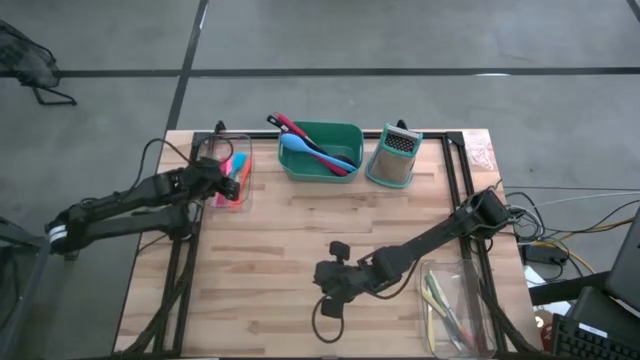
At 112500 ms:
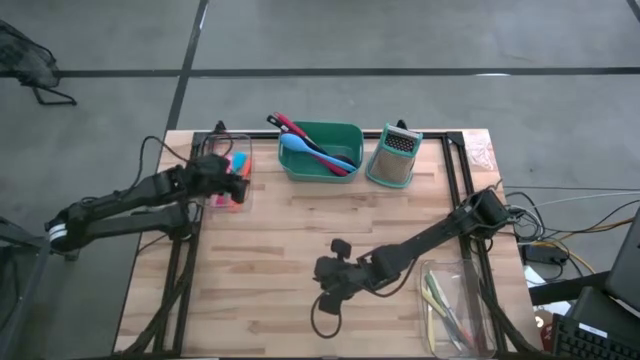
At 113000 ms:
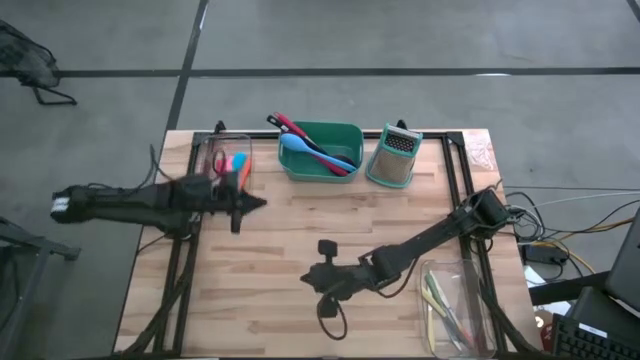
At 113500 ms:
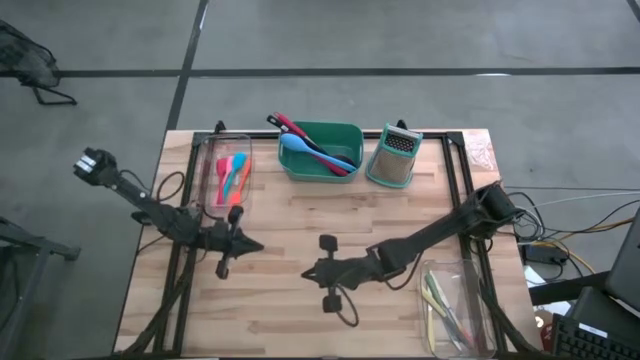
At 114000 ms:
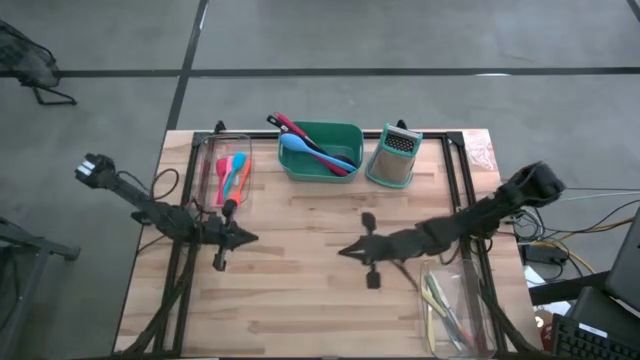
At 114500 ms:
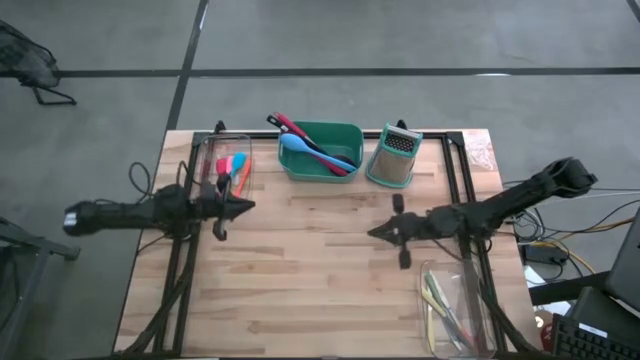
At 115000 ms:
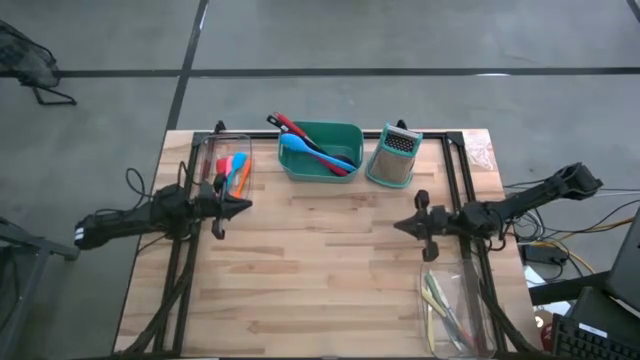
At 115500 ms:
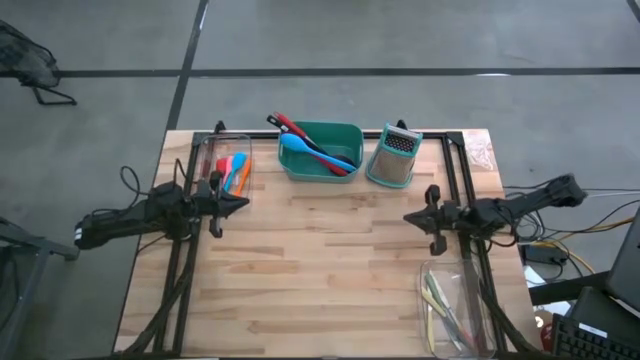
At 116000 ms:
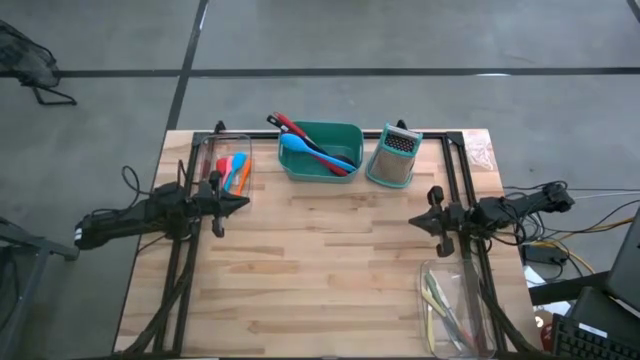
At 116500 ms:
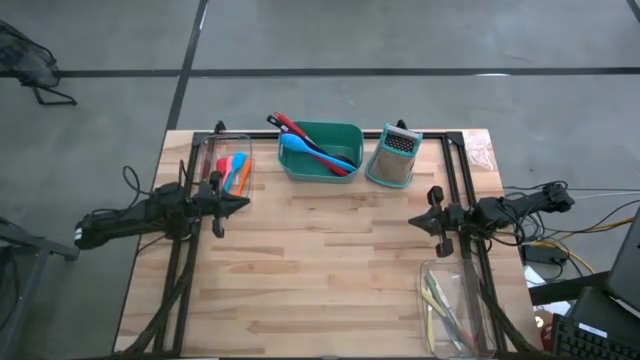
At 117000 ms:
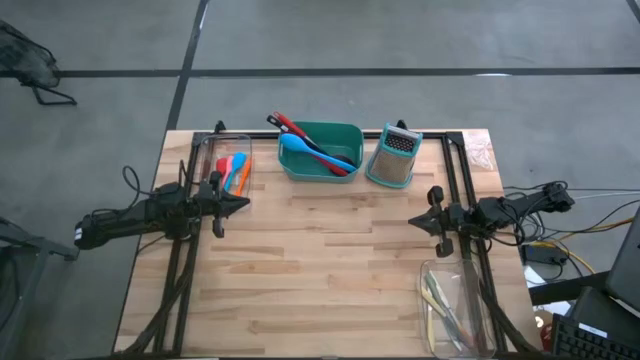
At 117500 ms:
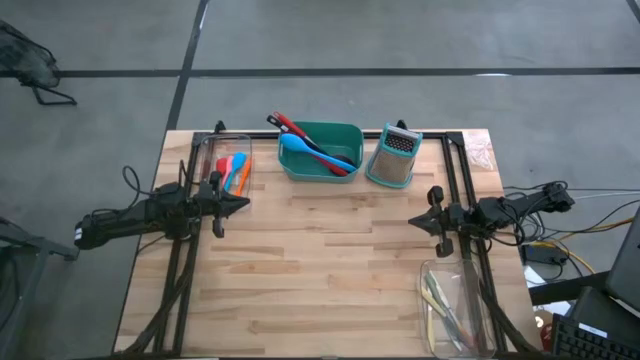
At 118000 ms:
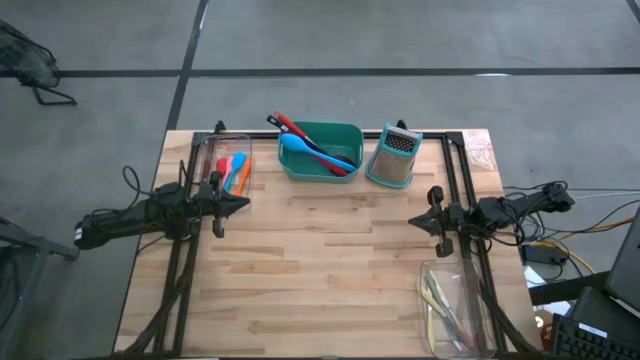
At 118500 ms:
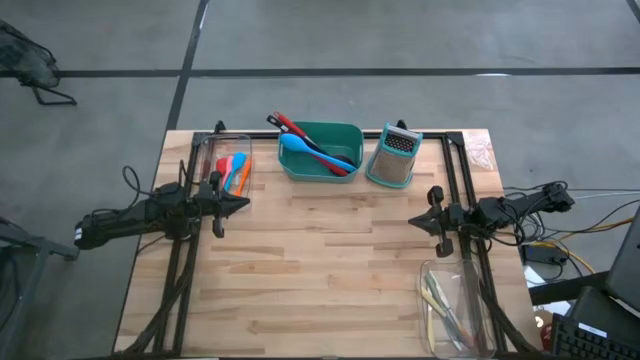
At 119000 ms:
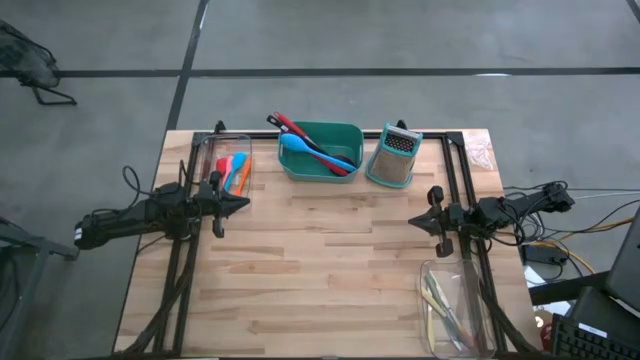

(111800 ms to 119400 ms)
Task: Pick & Place Kitchen Items
Return to home position

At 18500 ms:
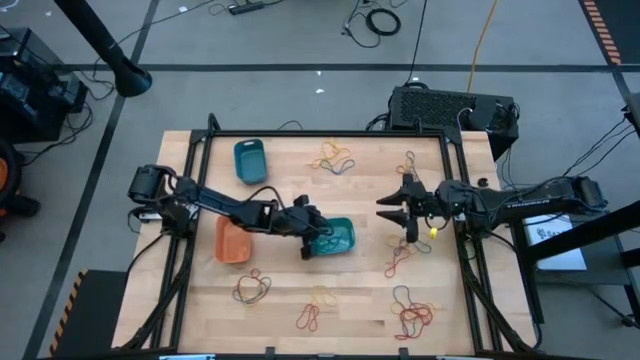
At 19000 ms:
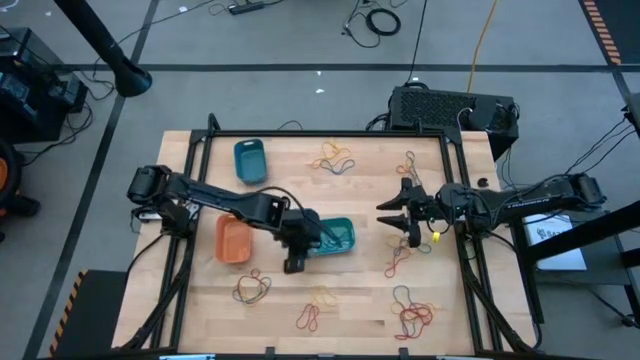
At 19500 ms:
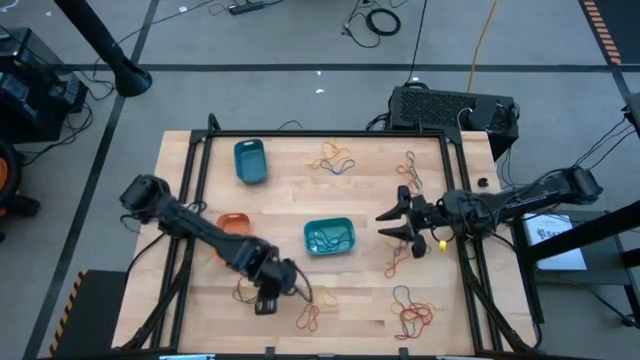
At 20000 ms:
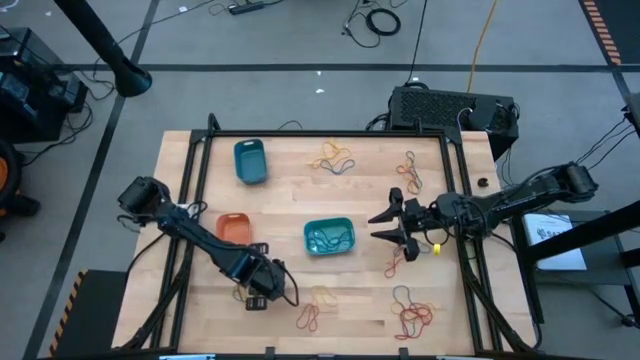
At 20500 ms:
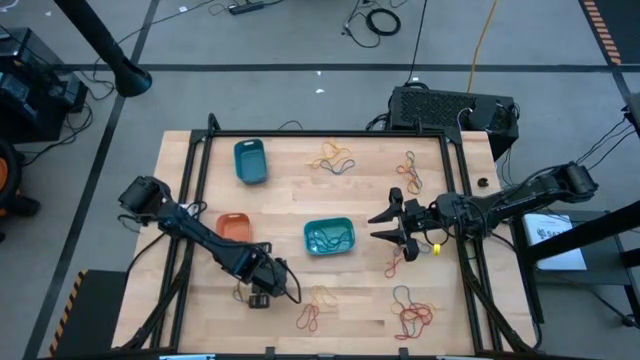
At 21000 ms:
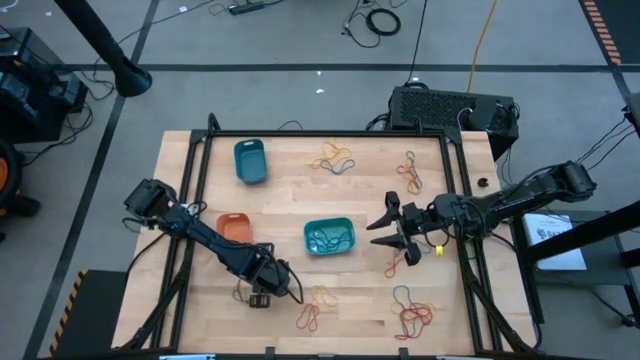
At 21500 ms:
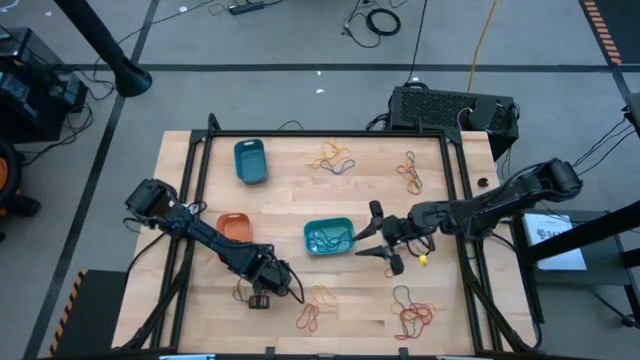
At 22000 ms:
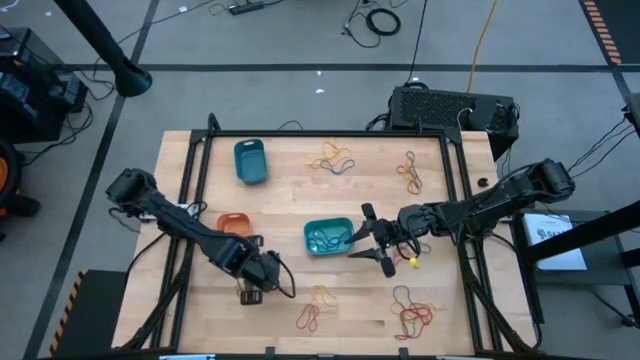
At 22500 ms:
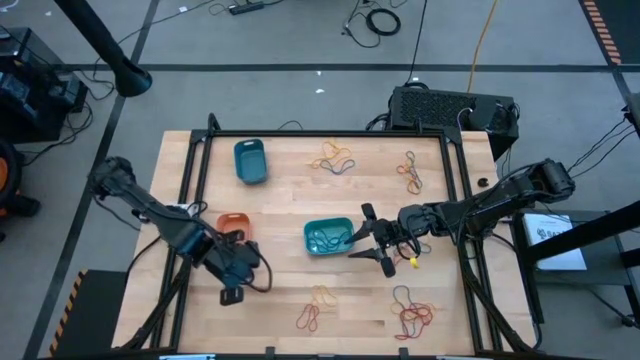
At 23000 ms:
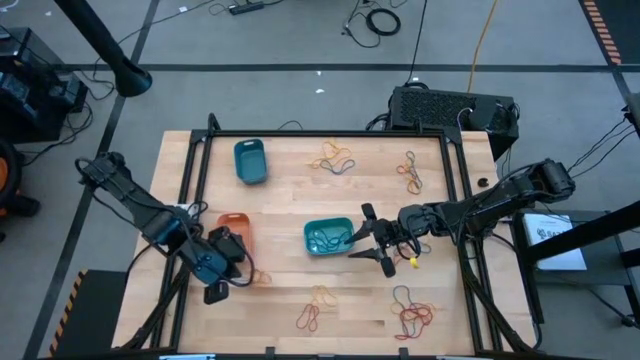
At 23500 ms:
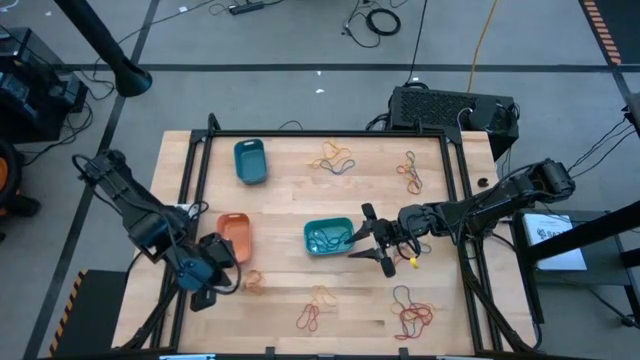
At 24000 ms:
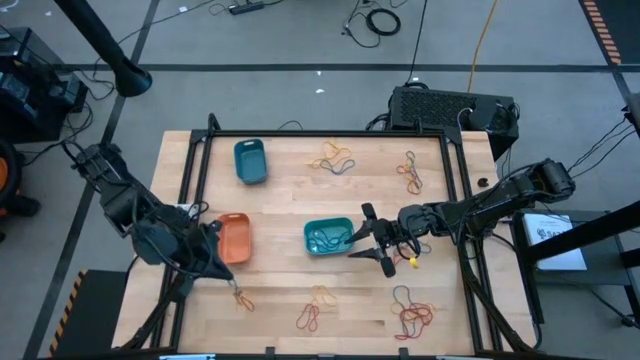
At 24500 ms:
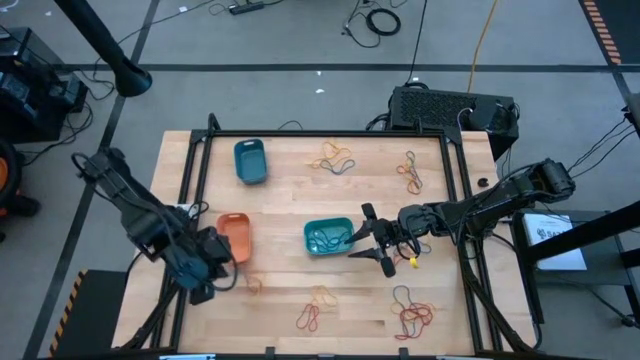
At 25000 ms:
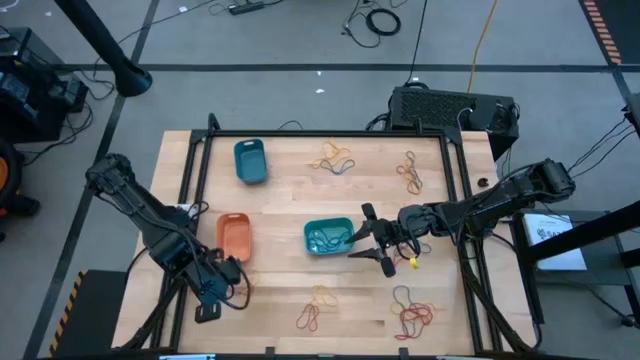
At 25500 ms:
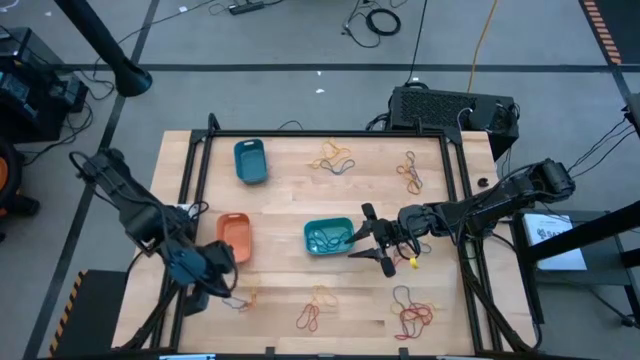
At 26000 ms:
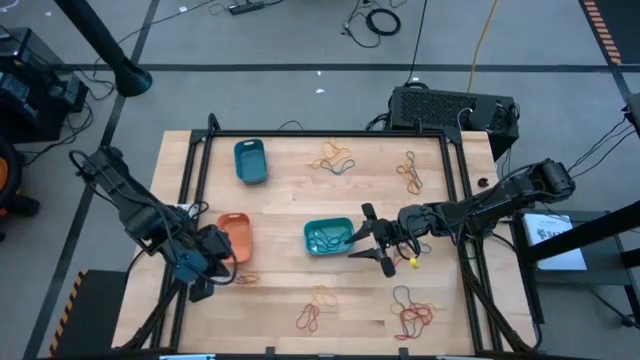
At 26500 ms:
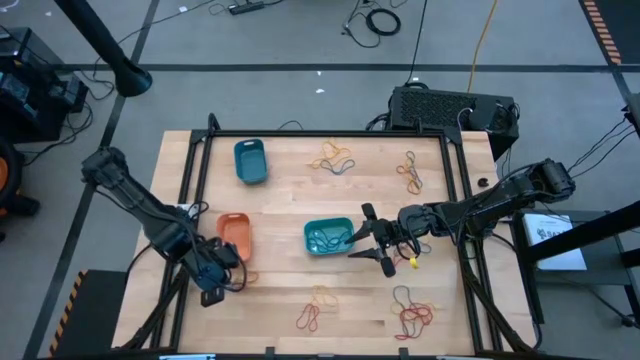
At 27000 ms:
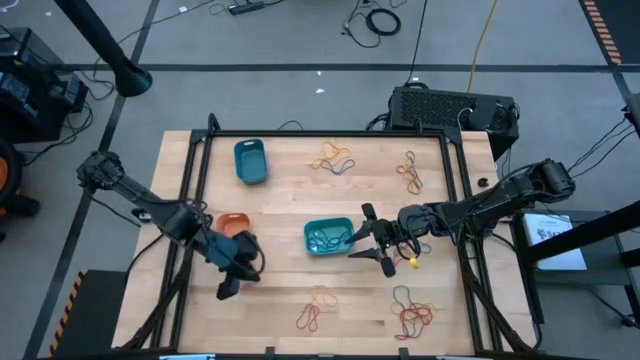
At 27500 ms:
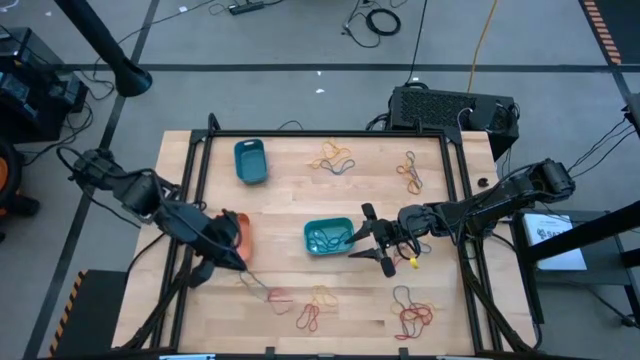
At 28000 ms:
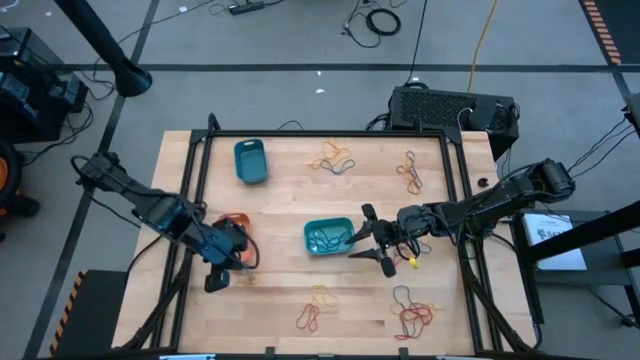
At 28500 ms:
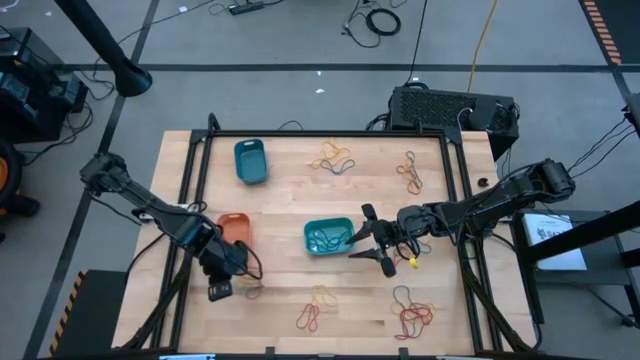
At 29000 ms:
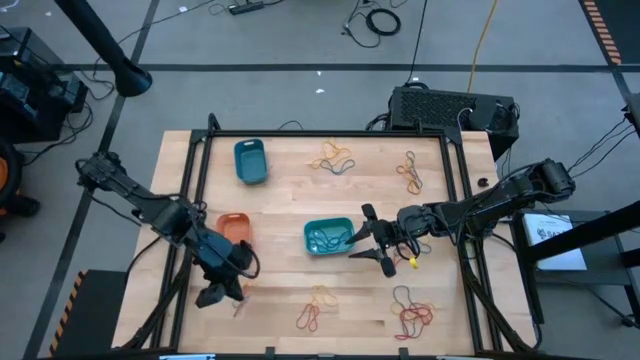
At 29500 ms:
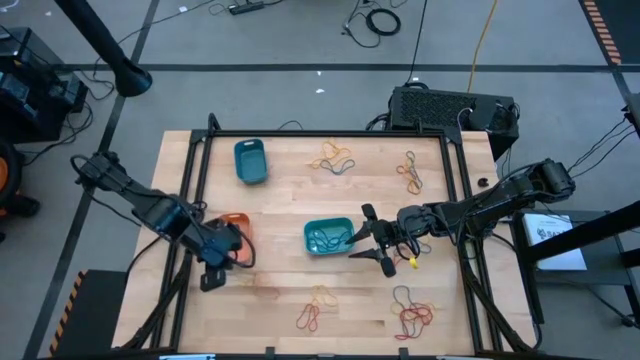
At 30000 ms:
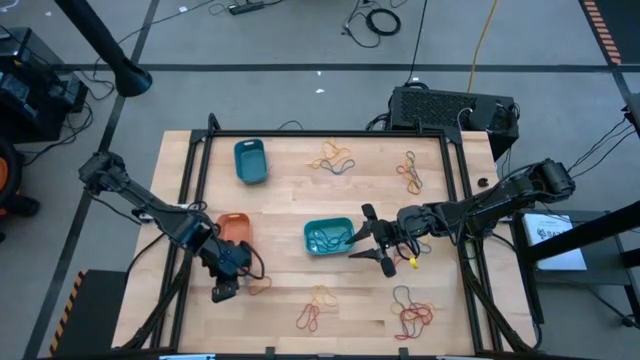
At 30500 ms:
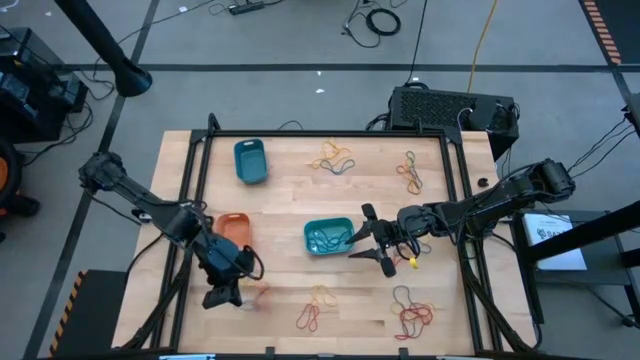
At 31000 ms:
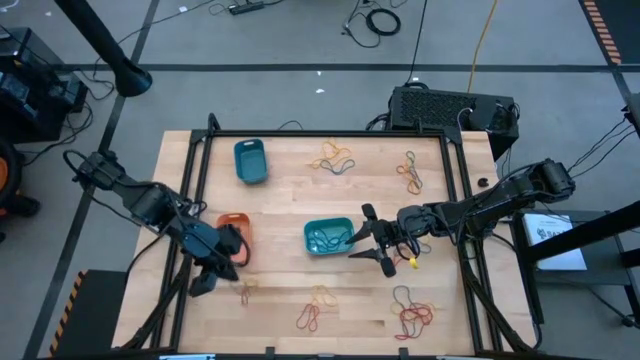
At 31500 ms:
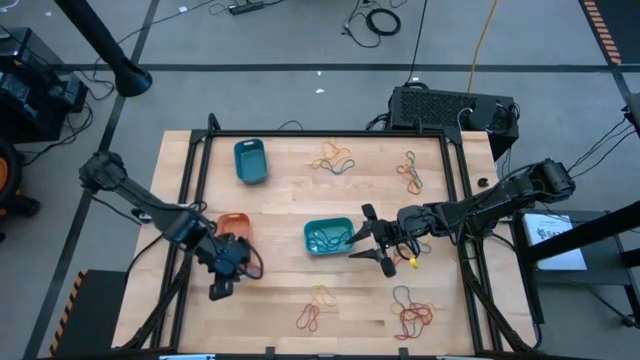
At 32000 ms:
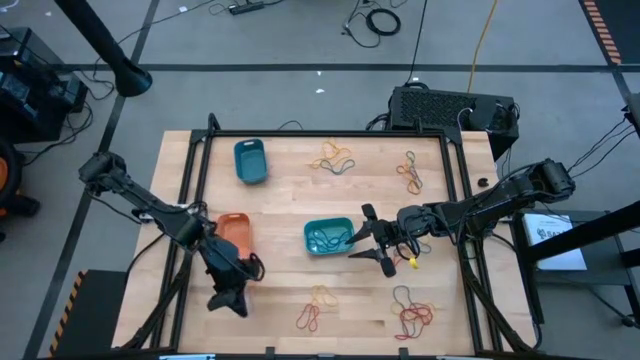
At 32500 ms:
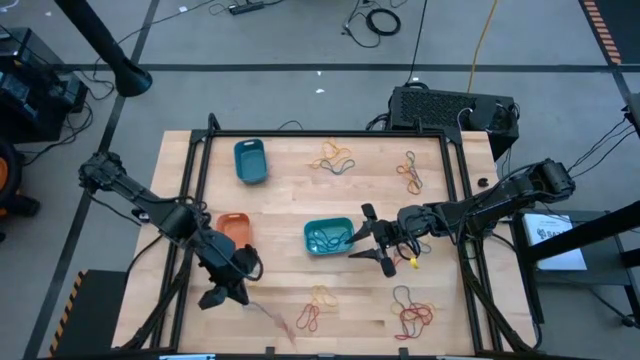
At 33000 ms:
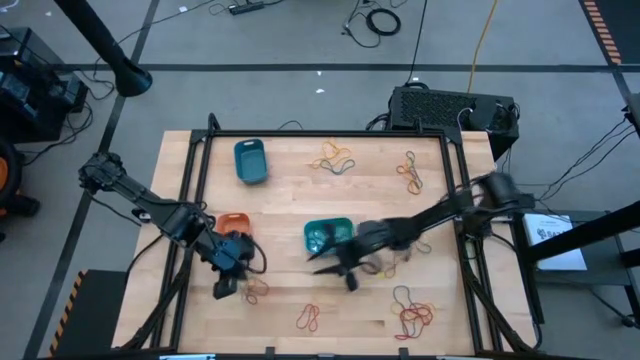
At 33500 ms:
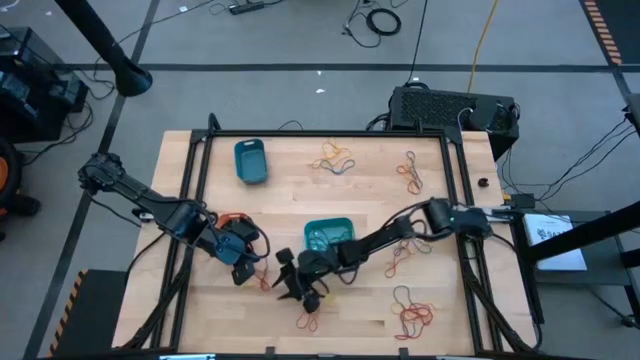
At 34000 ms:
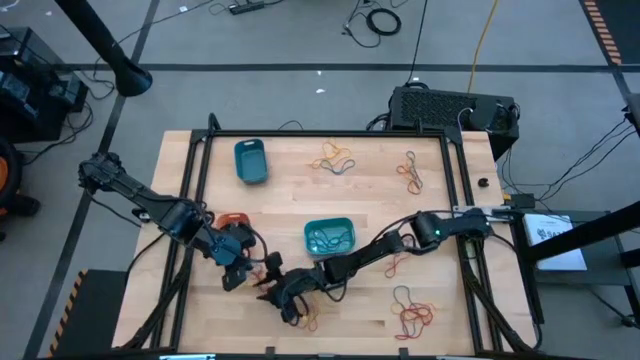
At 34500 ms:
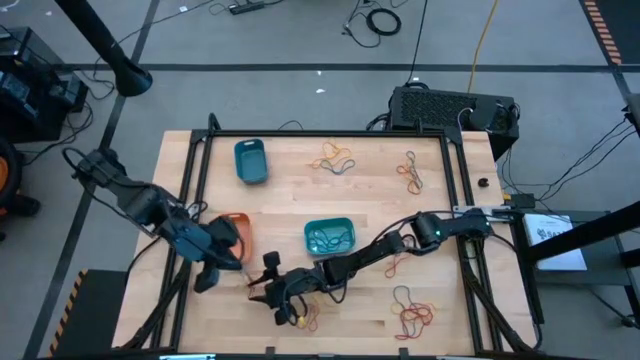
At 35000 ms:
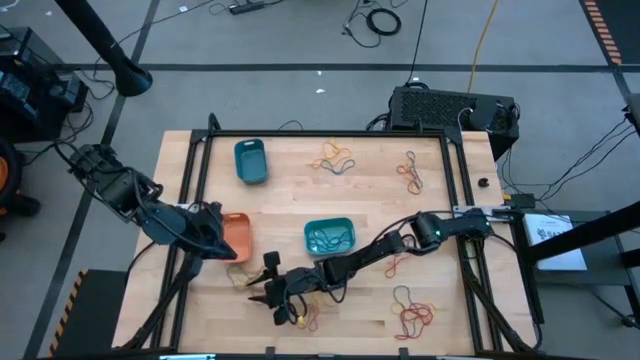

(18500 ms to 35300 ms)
Task: Sort rubber bands into baskets
Put the blue rubber band into the green bin
